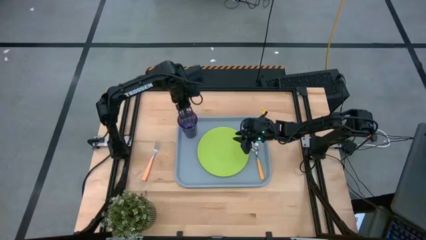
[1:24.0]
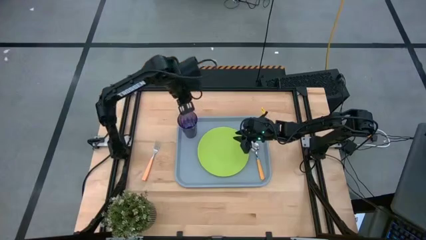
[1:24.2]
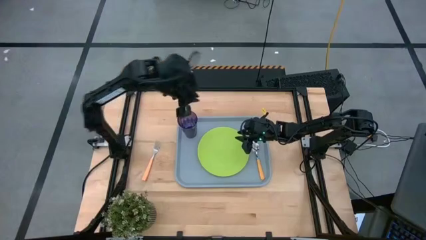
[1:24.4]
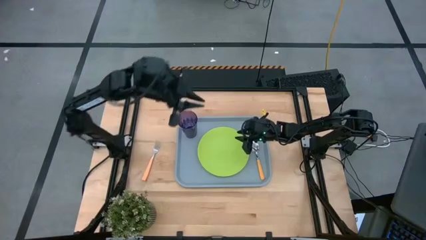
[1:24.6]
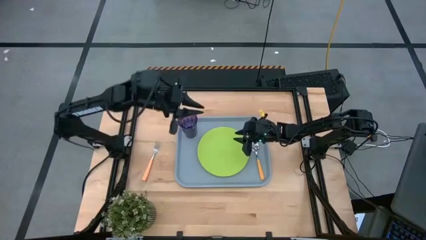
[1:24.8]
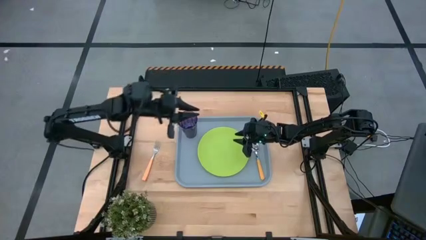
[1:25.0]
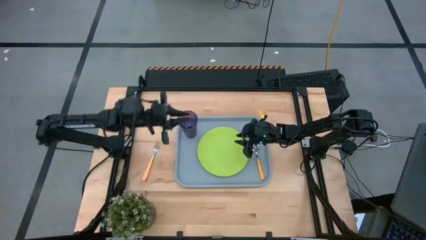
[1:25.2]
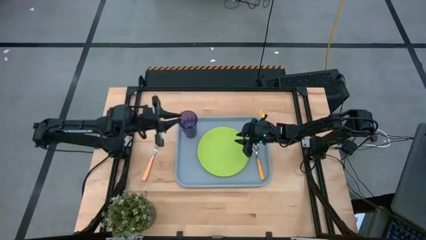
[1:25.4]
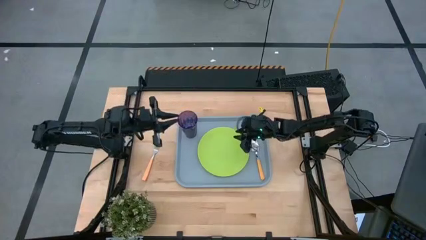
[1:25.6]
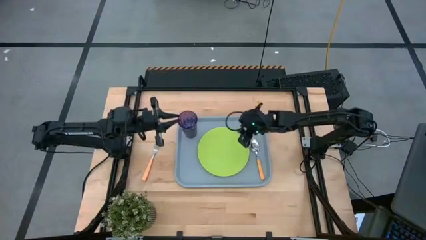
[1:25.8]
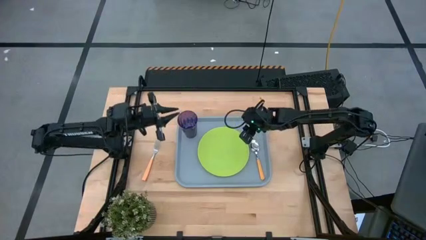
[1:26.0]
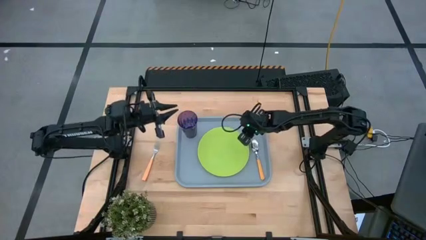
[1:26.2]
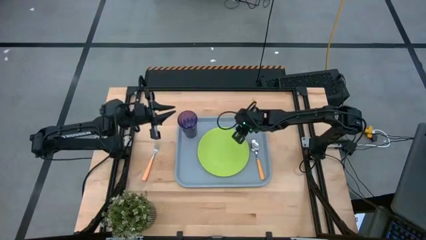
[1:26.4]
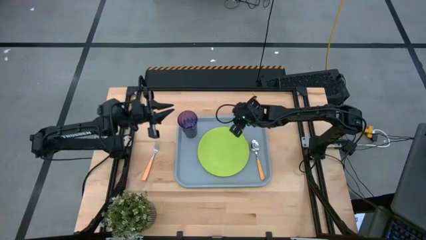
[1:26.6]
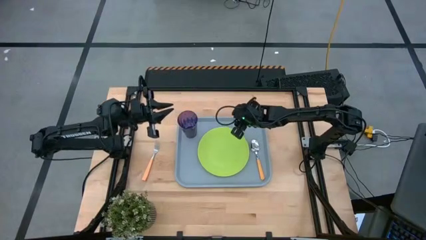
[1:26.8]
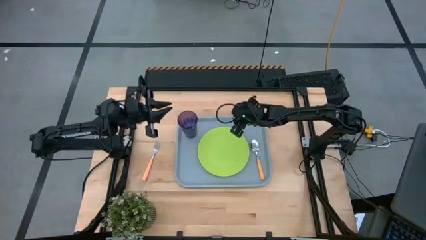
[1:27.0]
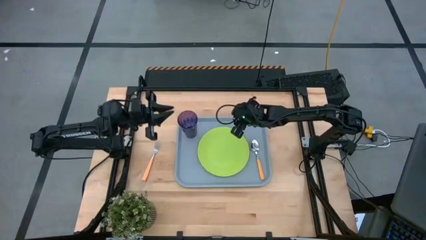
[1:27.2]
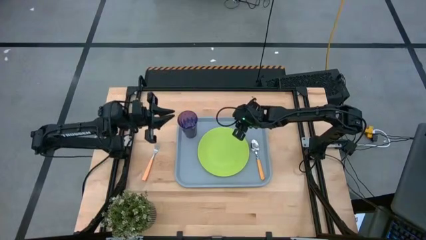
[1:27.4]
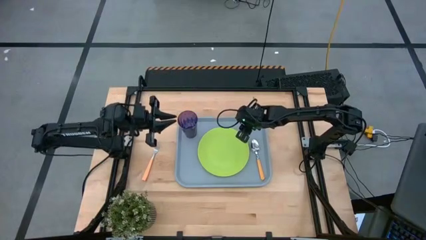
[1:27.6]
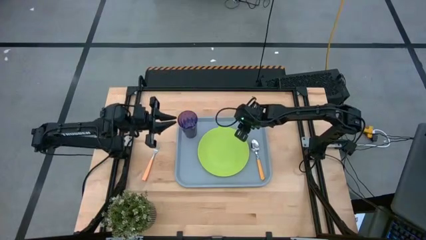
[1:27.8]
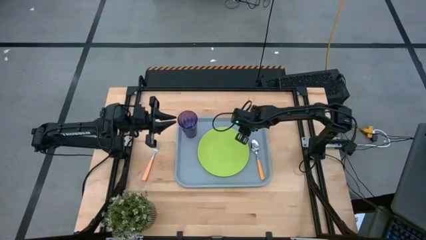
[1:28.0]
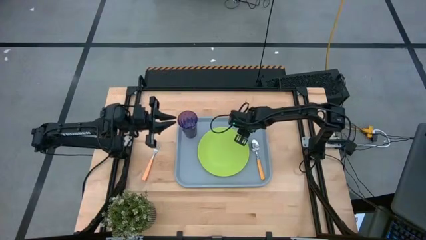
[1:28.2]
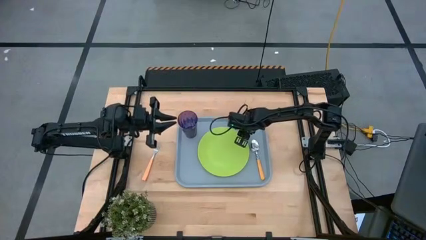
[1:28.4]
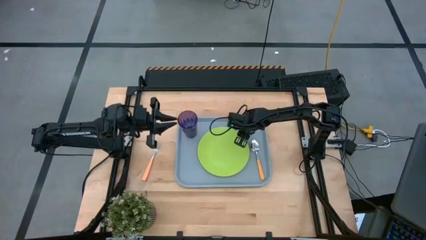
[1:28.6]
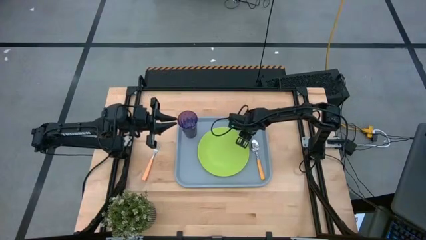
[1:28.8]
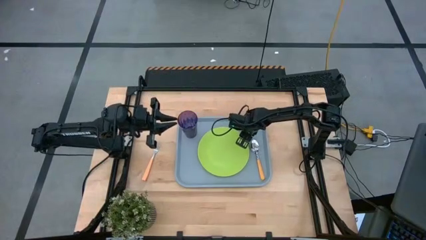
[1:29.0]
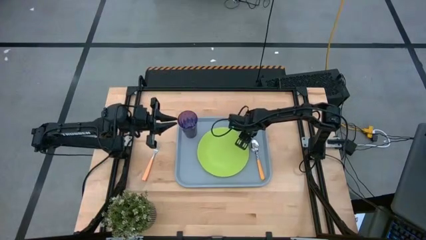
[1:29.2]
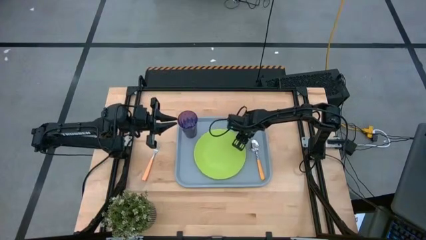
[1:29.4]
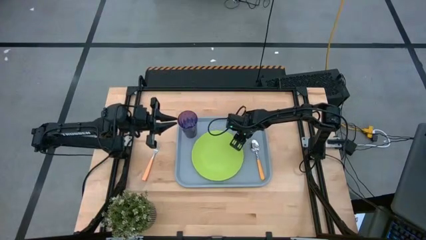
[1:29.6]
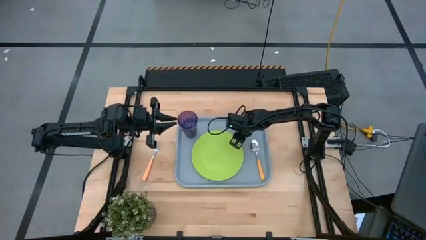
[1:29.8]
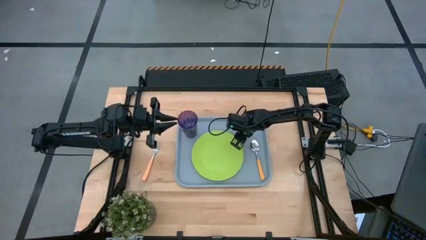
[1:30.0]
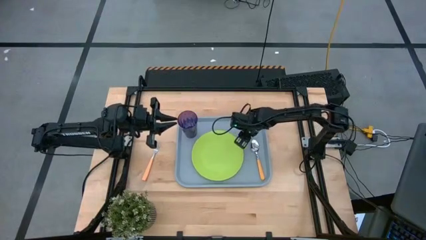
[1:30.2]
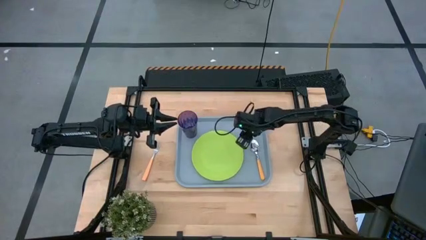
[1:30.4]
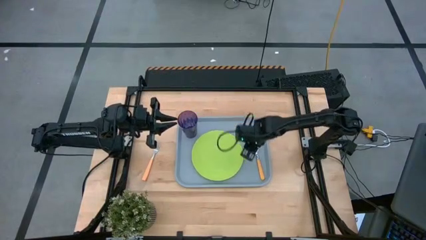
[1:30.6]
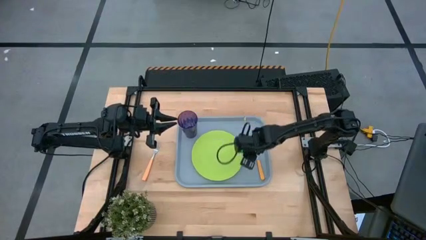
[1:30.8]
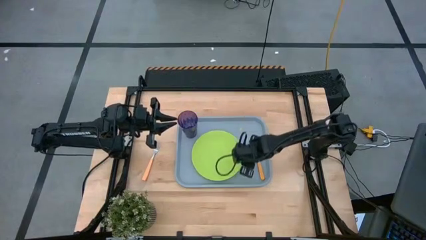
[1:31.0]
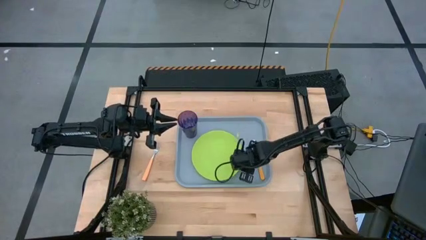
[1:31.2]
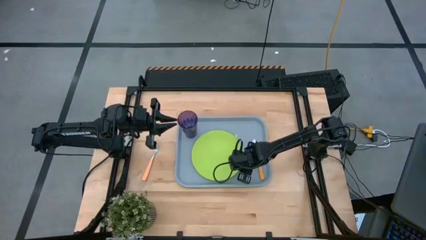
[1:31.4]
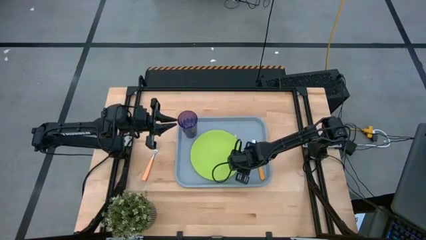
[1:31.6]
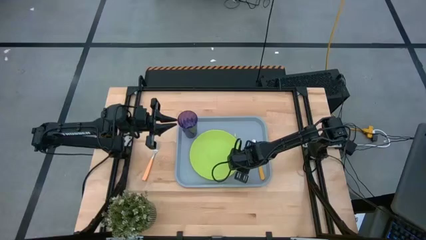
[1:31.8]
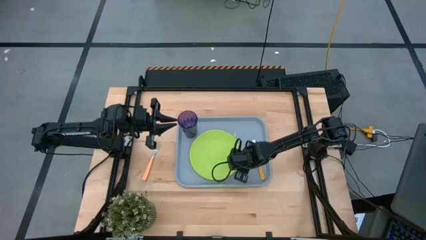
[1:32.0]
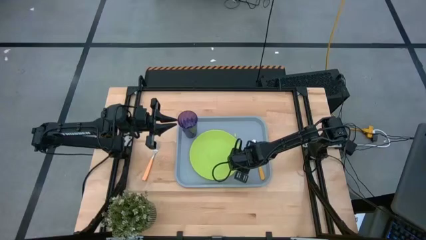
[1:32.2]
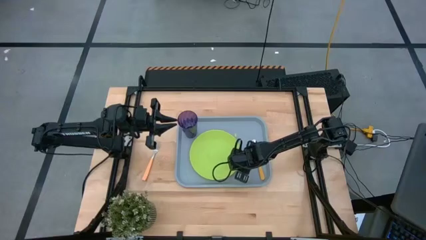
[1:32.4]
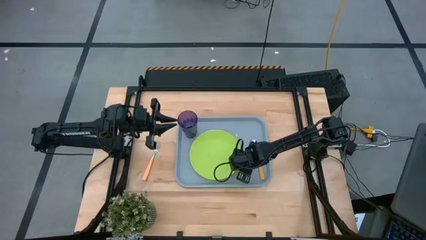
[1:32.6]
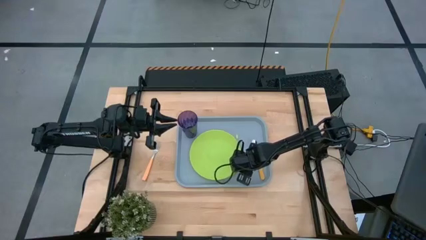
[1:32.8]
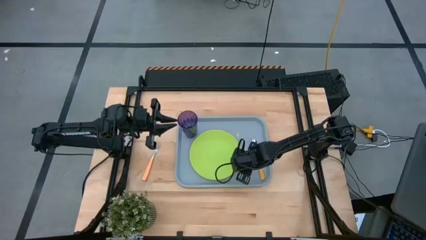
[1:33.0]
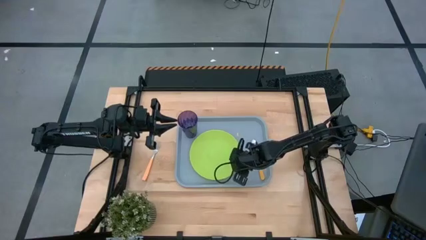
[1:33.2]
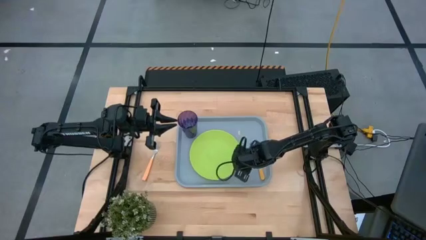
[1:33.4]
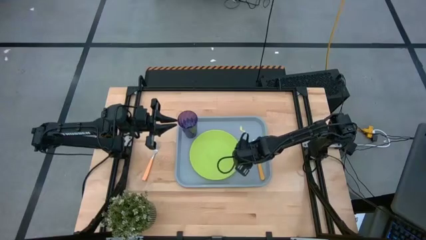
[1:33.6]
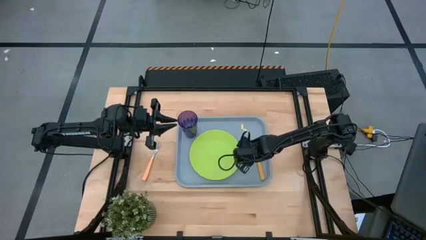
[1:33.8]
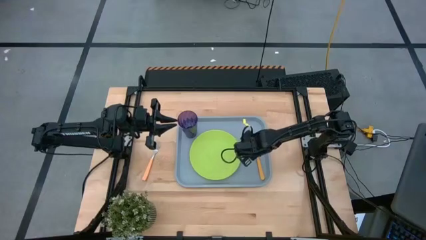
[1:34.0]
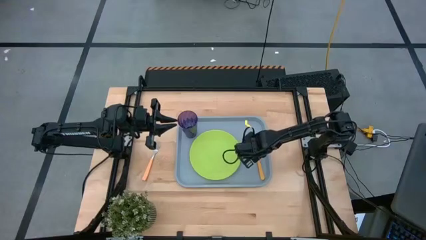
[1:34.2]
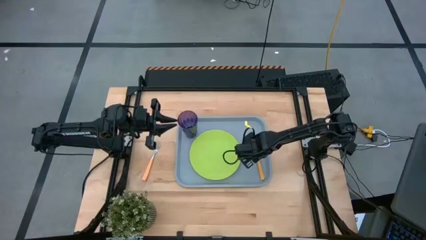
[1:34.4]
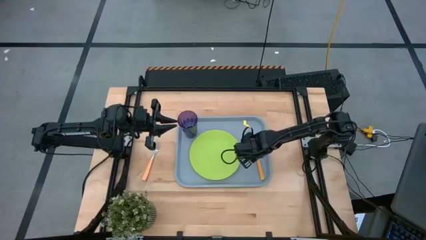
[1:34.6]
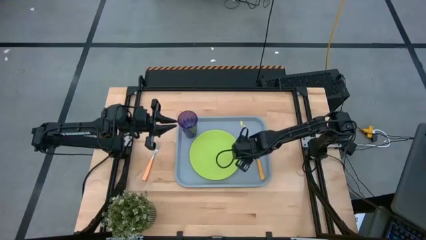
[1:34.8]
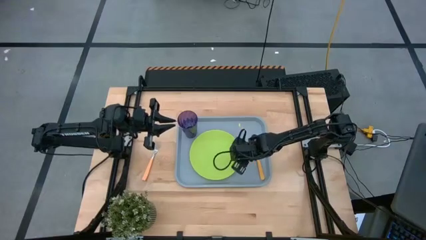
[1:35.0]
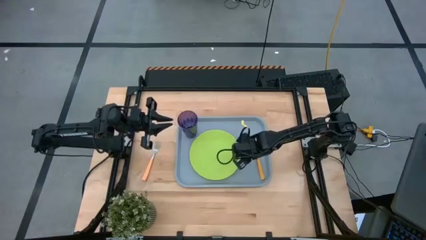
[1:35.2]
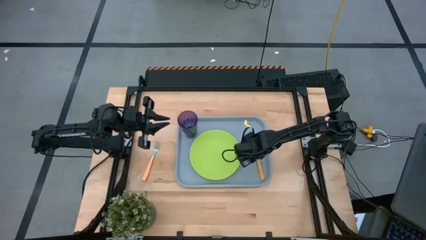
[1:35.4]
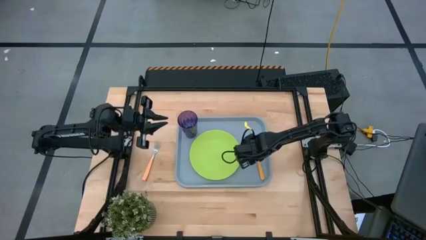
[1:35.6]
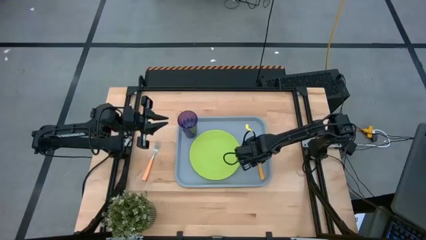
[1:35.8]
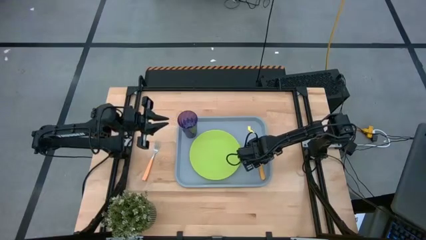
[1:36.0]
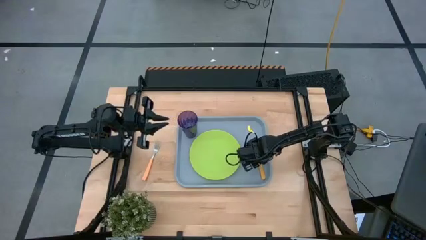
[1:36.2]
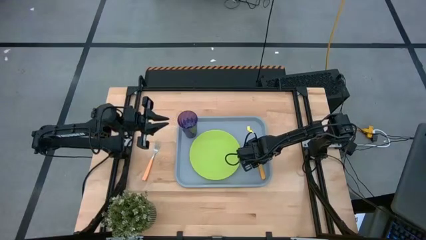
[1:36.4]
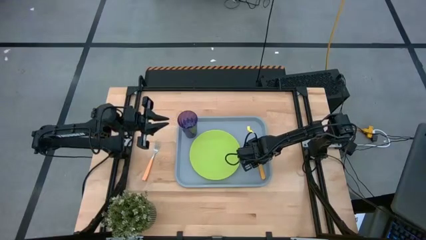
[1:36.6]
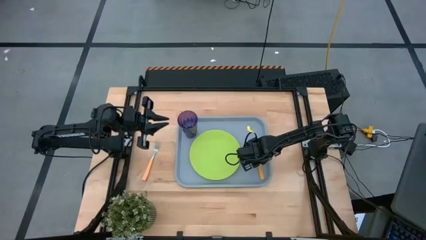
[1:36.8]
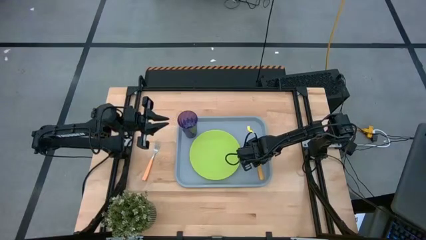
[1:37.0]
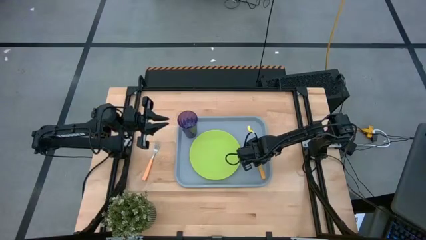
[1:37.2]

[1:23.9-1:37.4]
Task: Pick and place plate/cup/fork/spoon on tray
Adjust the green plate and the orange spoon on the gray serving tray

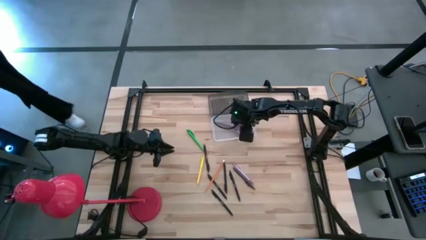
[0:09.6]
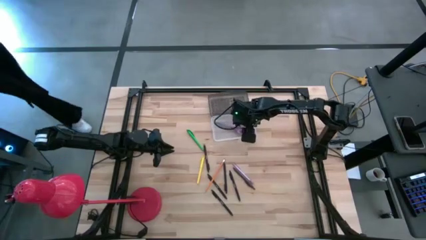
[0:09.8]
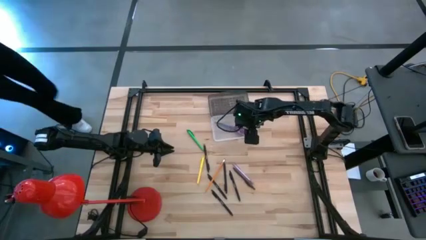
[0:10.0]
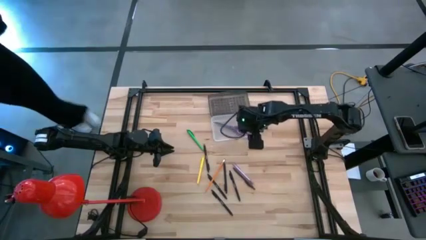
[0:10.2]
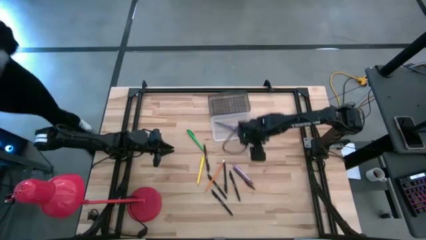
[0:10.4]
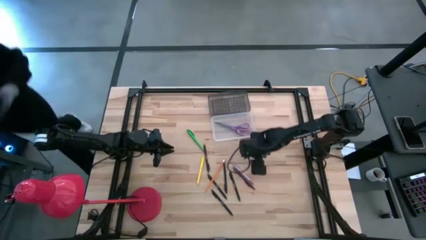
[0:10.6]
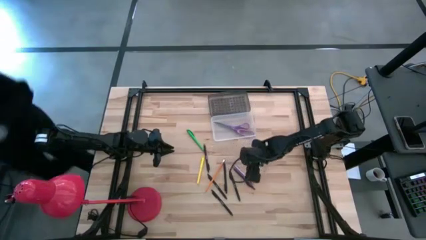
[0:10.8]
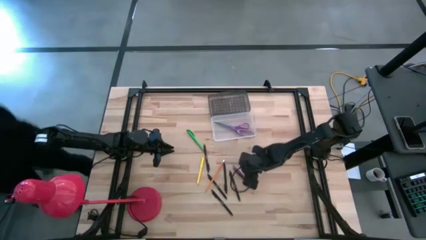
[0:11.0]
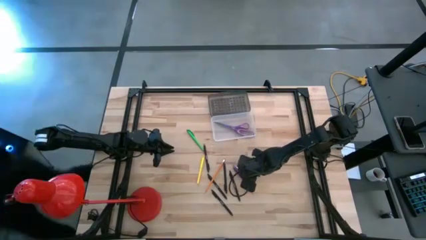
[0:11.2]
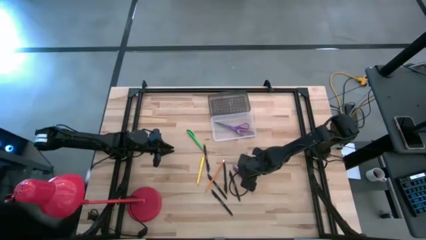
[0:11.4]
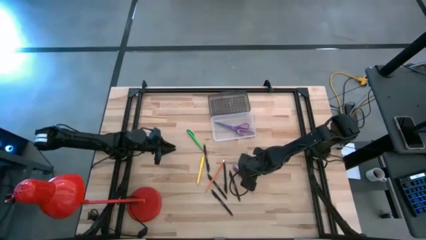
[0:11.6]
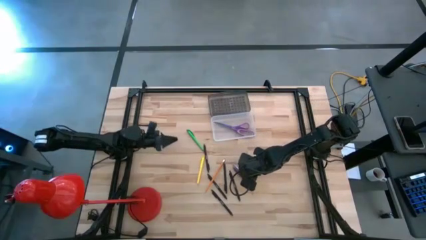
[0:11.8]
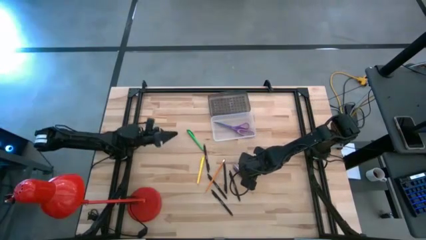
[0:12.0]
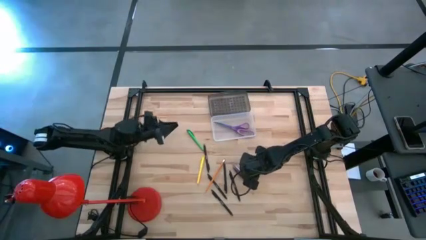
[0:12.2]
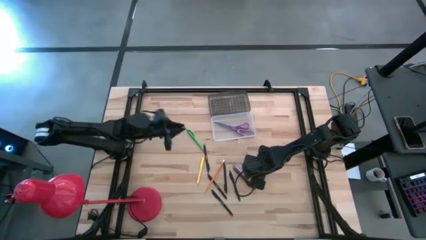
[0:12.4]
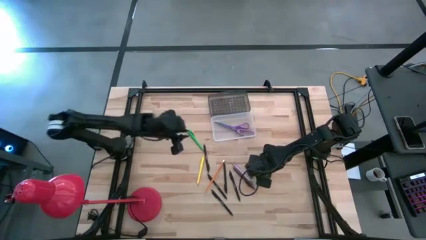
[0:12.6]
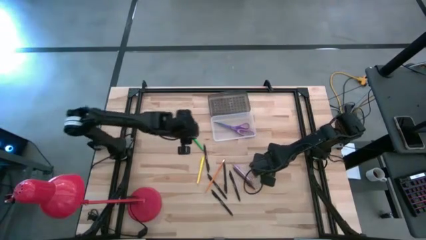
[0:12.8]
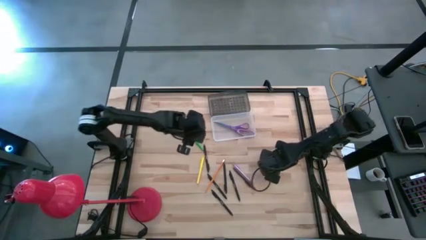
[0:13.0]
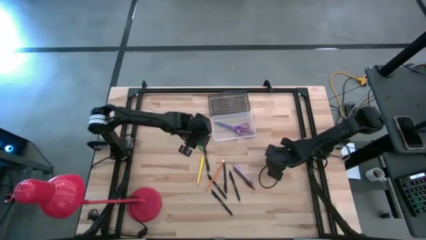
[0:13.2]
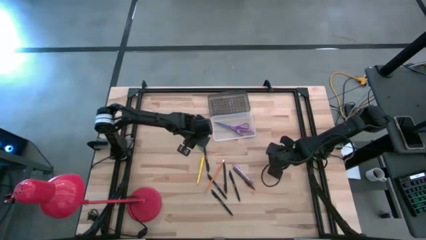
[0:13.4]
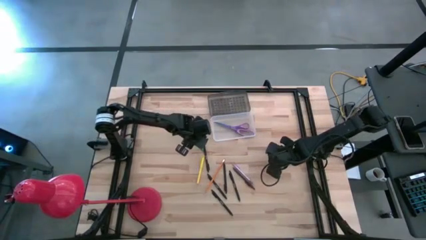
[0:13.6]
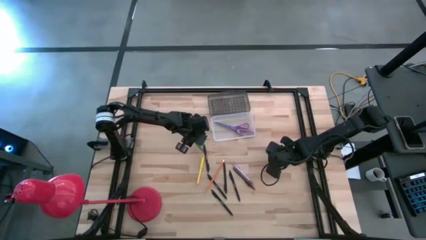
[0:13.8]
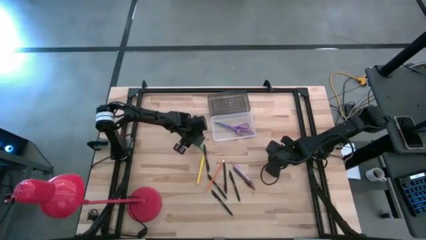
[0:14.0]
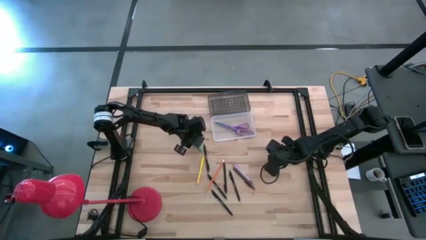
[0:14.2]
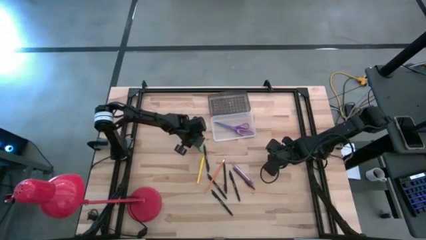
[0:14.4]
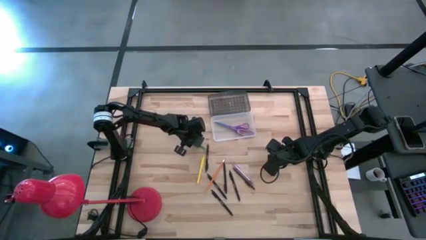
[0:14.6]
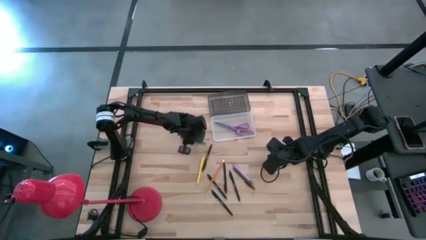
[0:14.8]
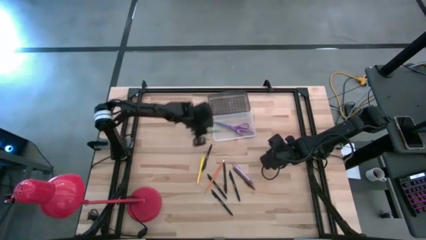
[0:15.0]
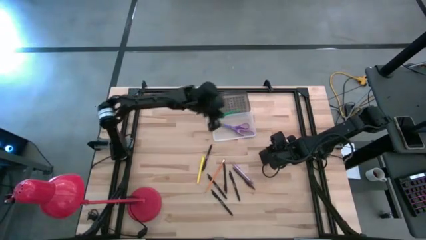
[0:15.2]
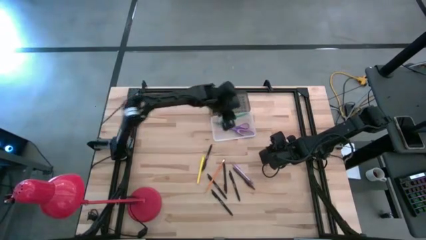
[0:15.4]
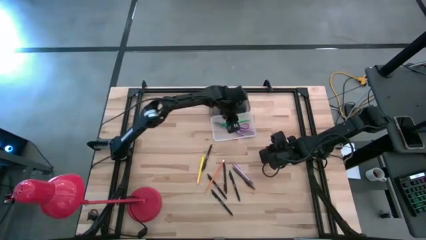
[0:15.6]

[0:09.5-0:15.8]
Task: Pick & place school supplies into a supply box
Put the green ballpen into the gray supply box
